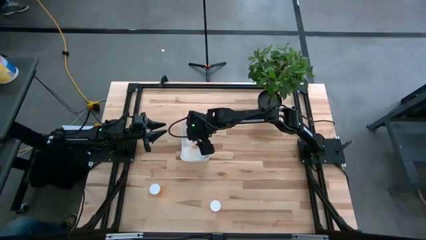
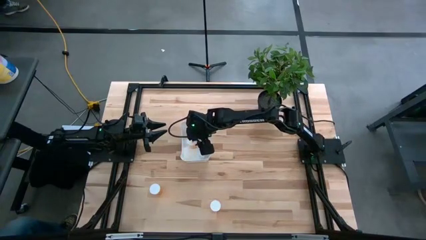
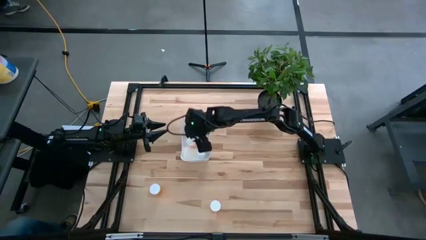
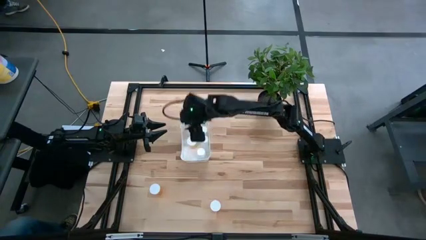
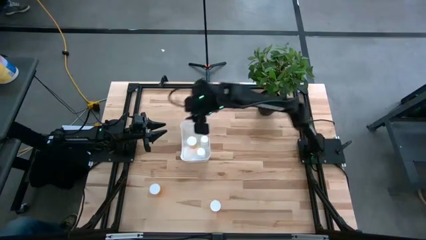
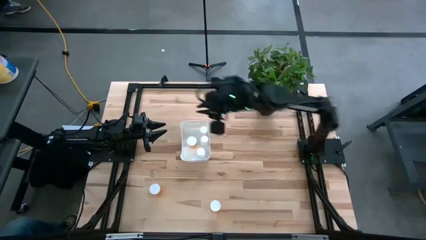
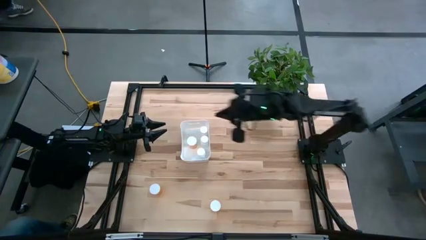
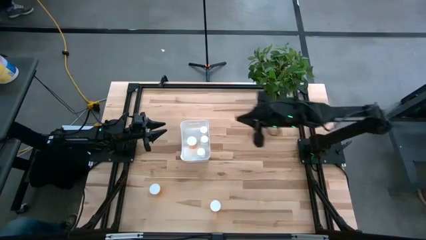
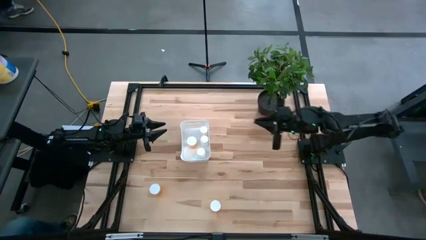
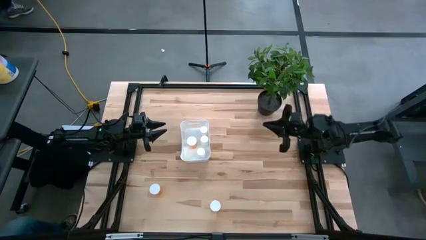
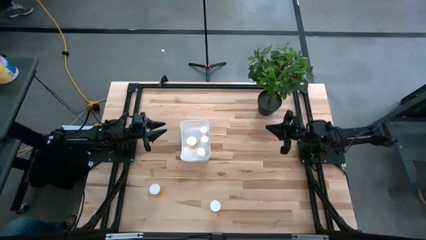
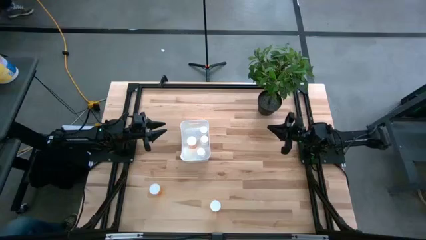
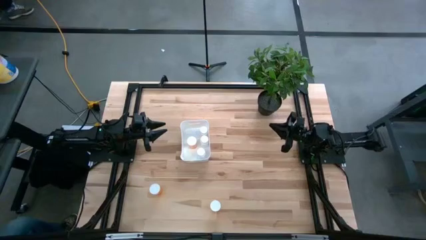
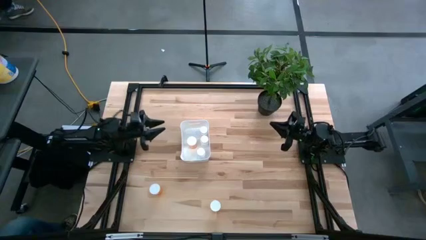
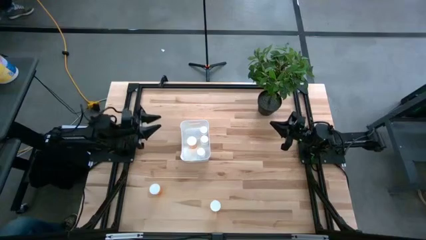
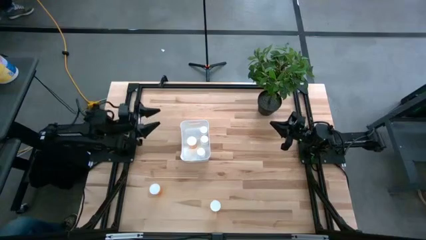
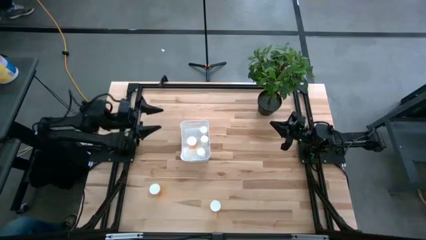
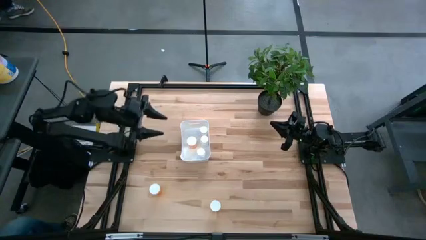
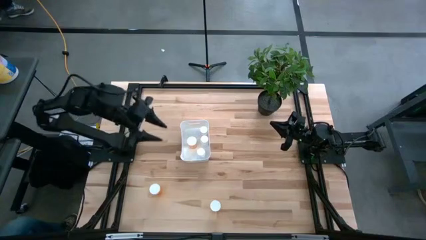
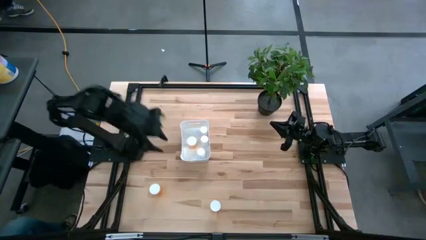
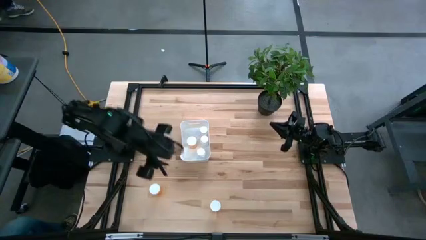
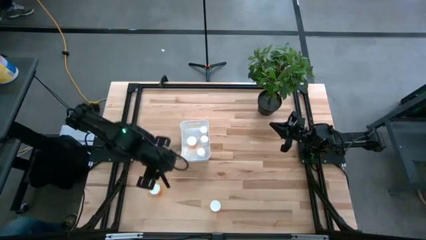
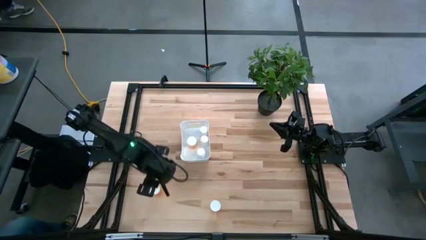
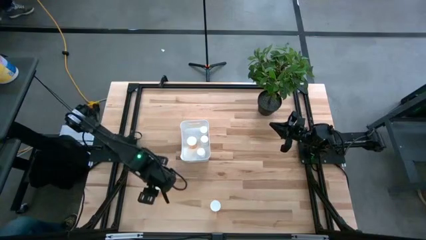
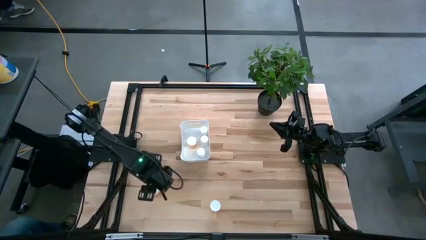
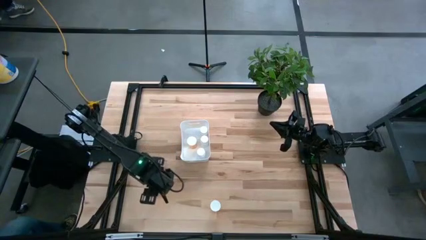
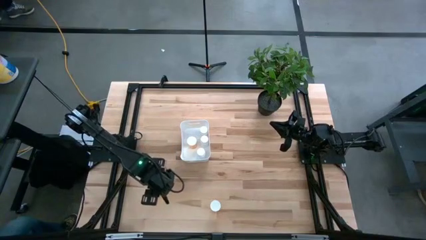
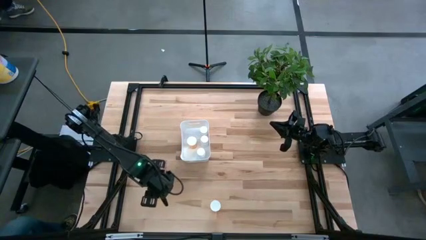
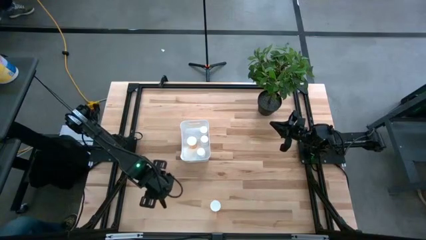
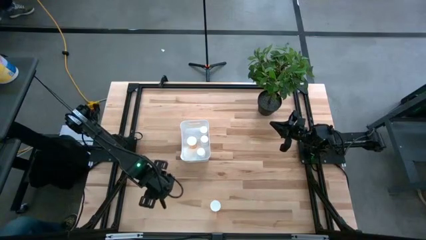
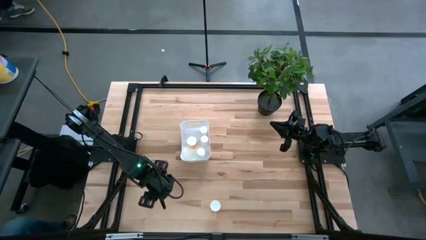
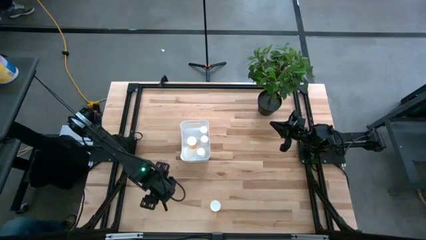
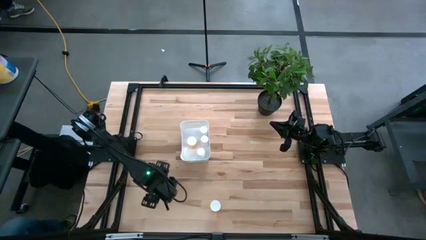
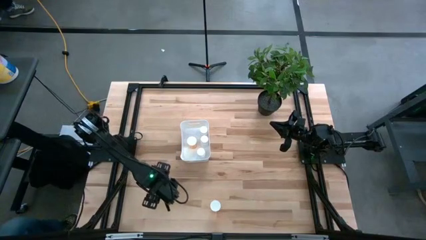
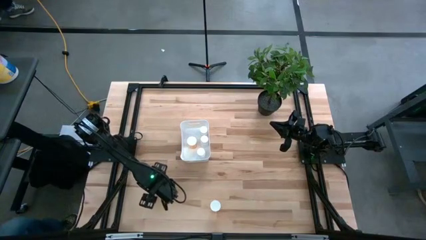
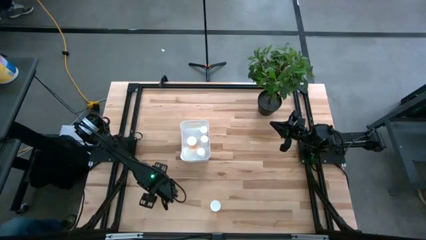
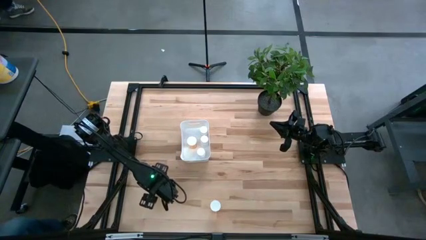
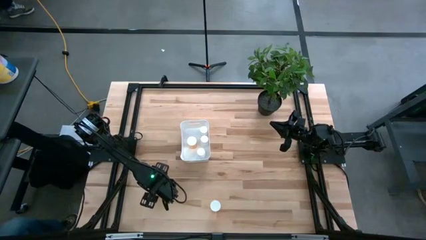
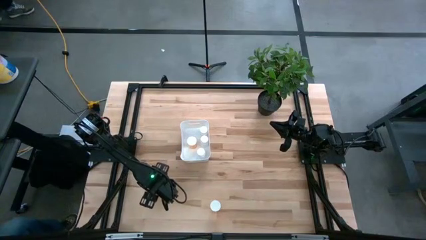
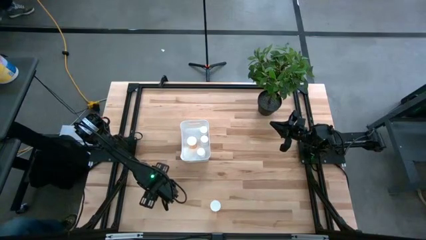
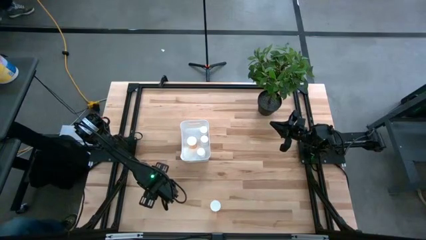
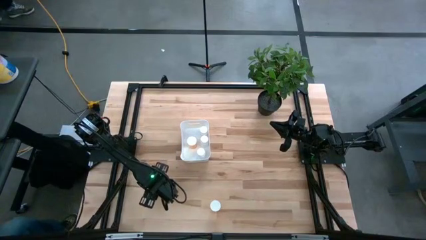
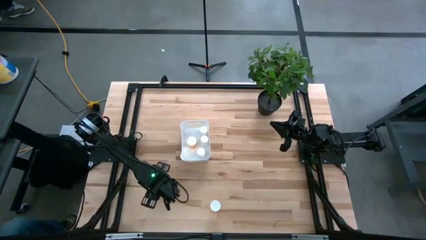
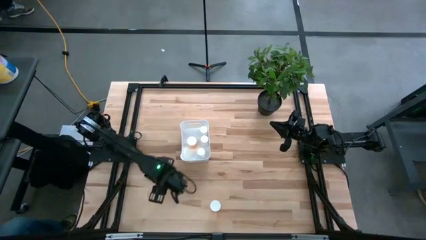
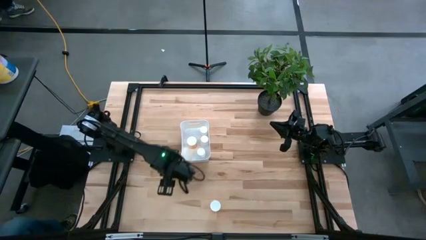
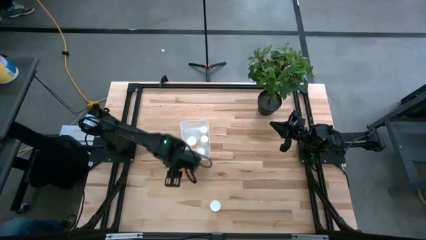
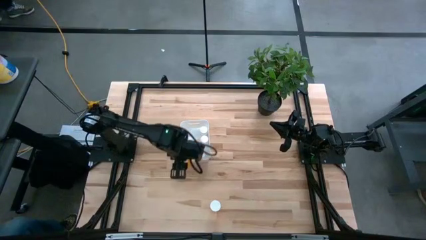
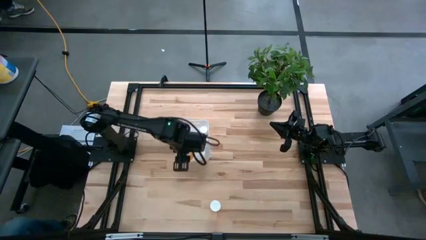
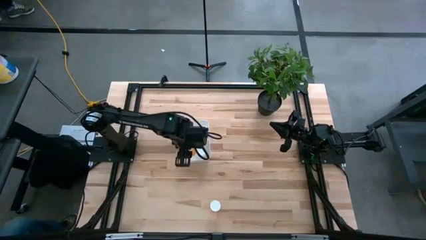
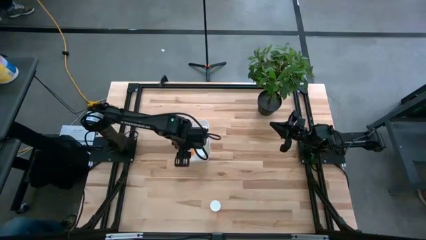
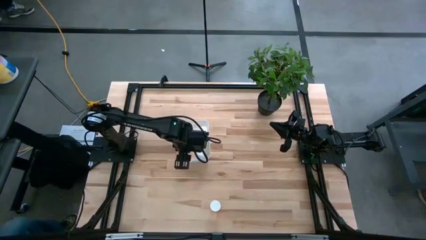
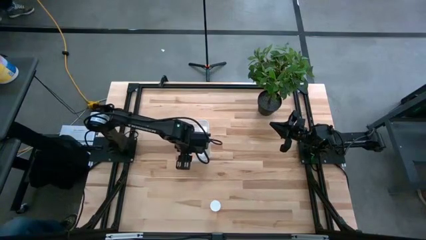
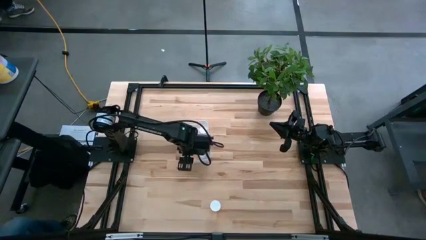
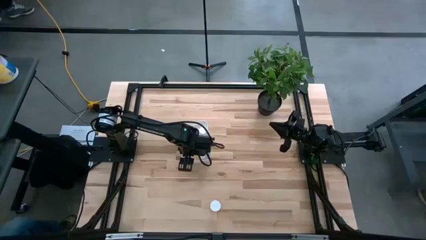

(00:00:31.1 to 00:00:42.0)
Task: Pick and place pill bottles into a basket
Put the left orange pill bottle into the white bin

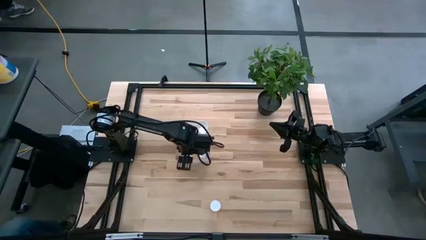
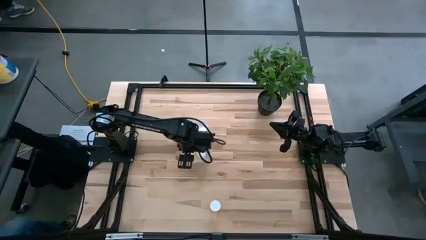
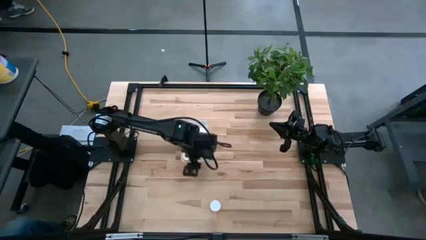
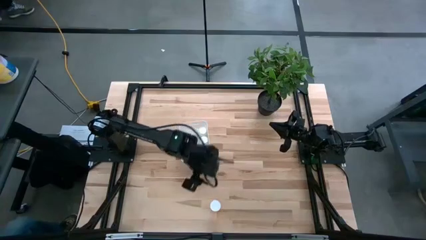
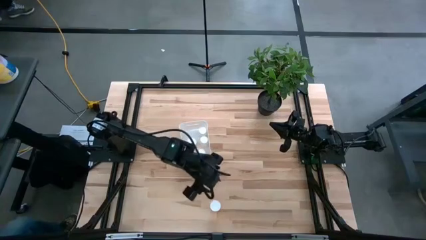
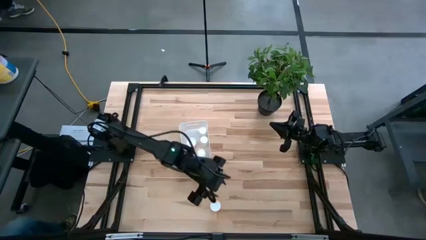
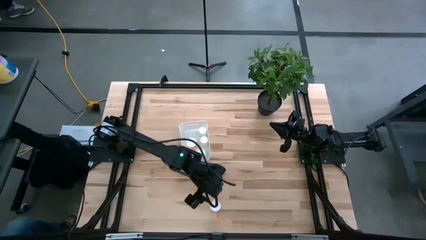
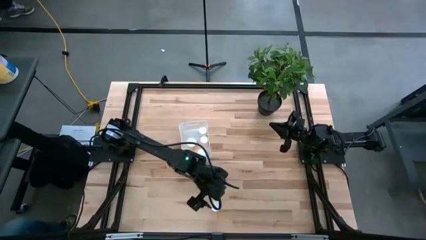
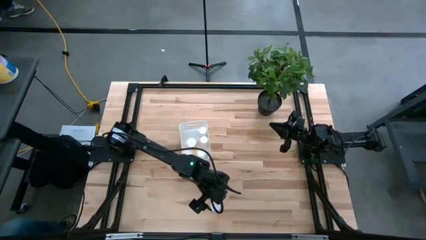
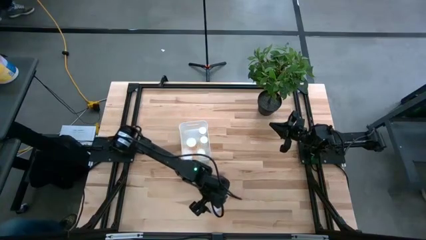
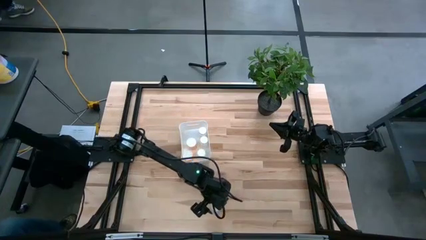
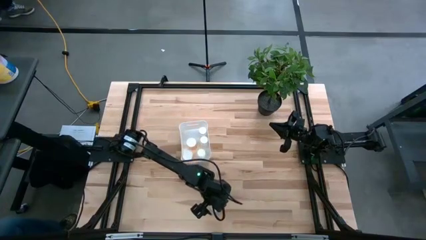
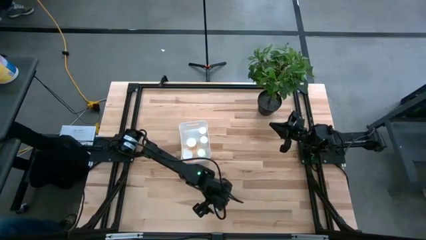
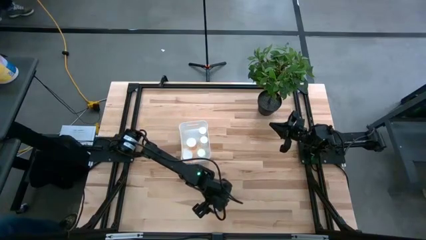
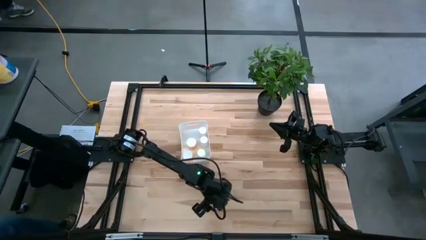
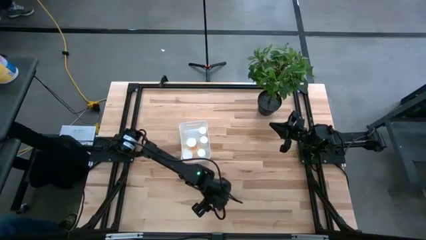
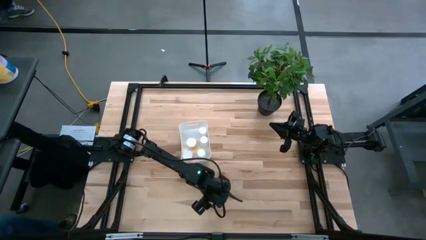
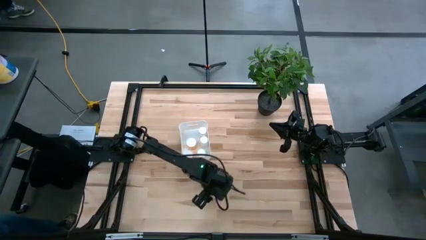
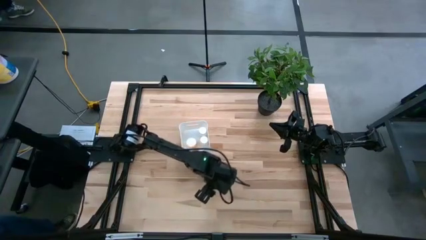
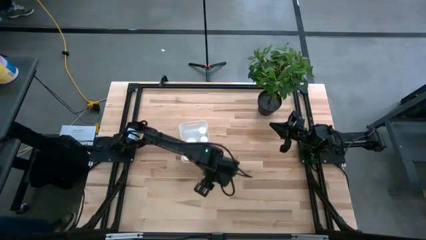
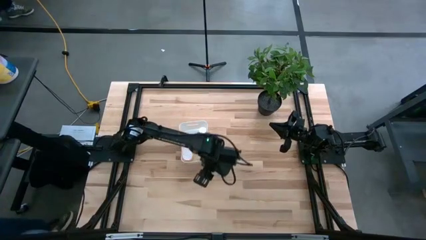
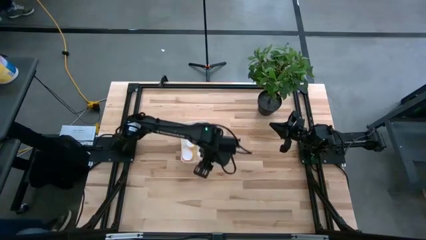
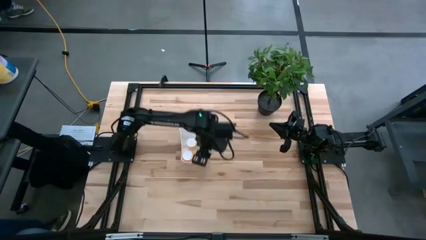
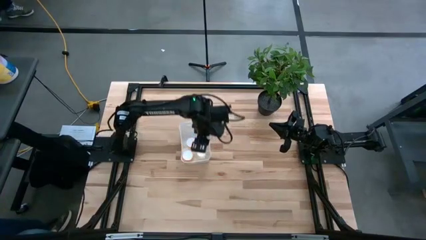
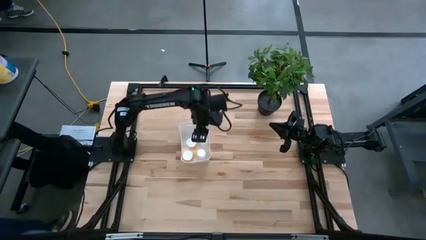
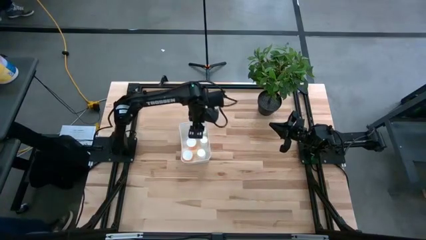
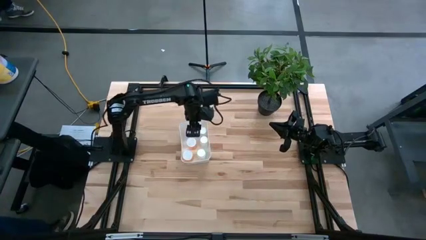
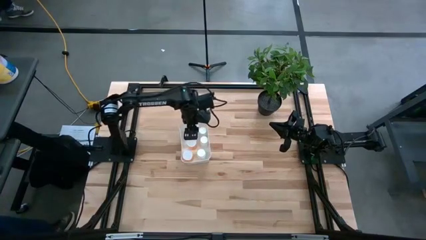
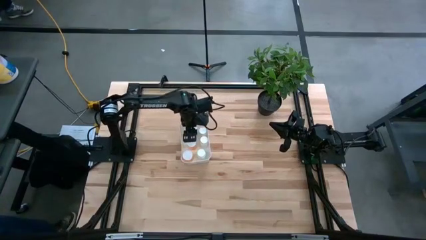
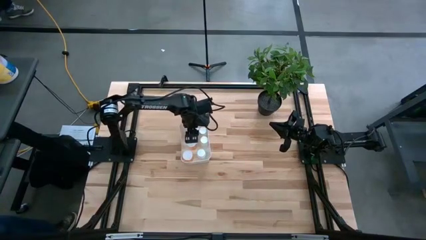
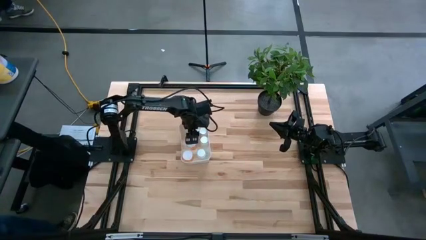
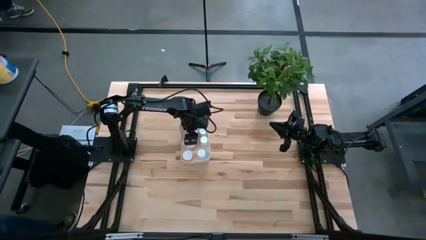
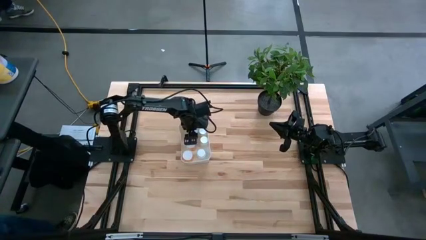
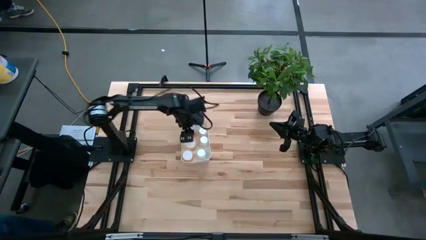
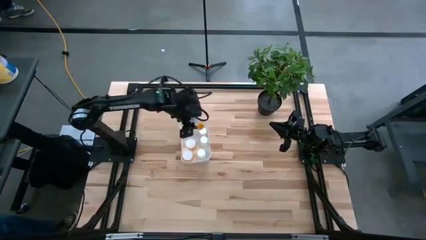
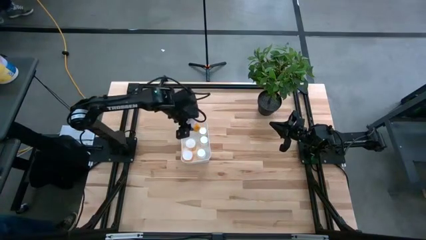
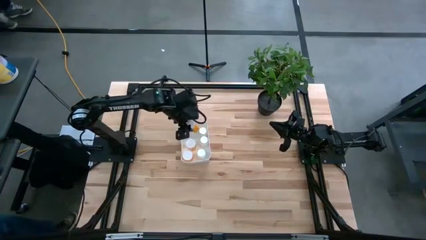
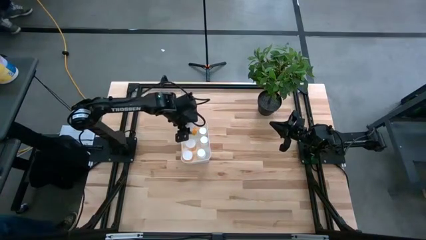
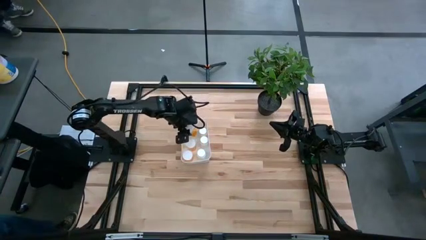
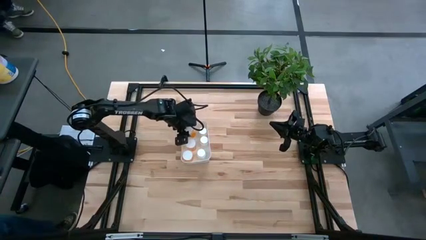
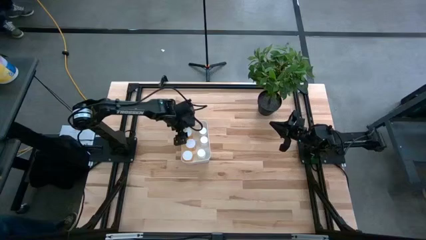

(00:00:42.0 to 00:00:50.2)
Put the orange pill bottle into the white bin
